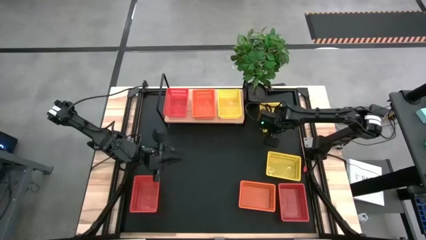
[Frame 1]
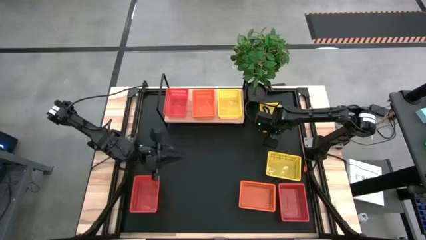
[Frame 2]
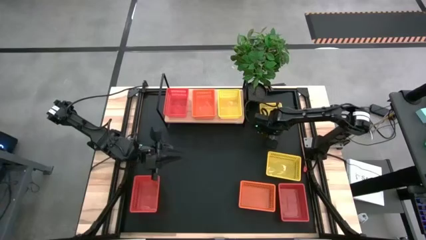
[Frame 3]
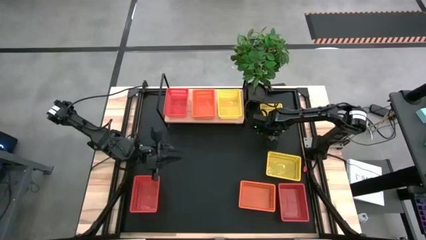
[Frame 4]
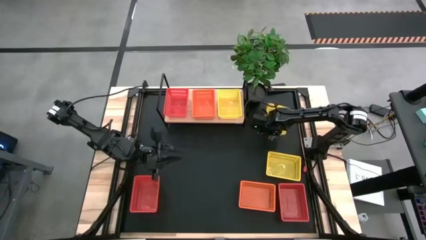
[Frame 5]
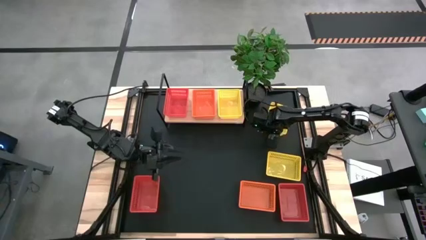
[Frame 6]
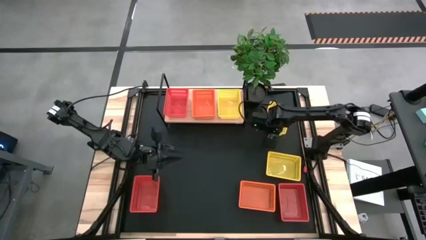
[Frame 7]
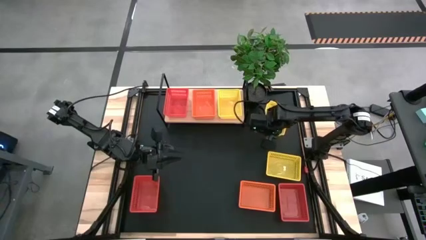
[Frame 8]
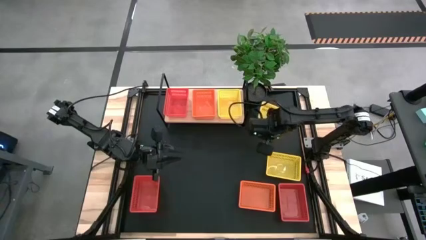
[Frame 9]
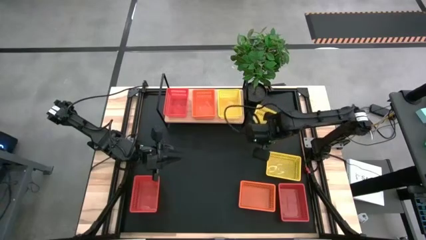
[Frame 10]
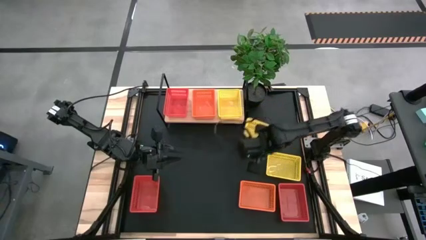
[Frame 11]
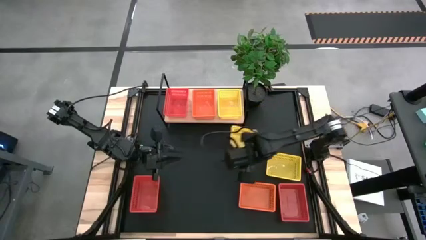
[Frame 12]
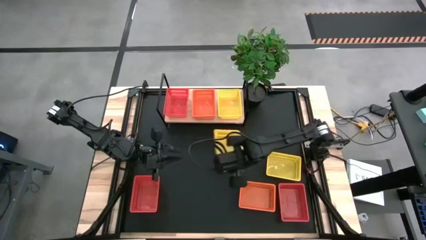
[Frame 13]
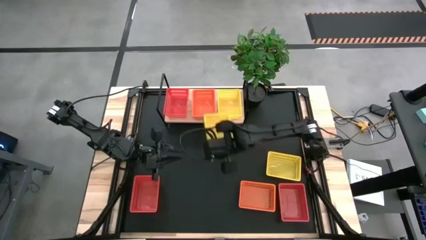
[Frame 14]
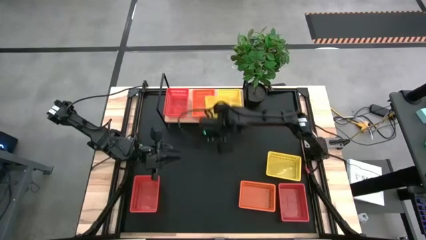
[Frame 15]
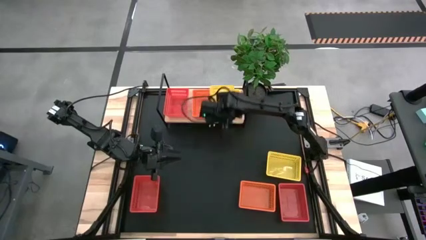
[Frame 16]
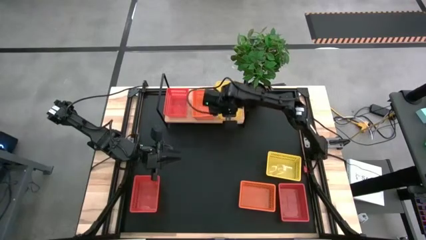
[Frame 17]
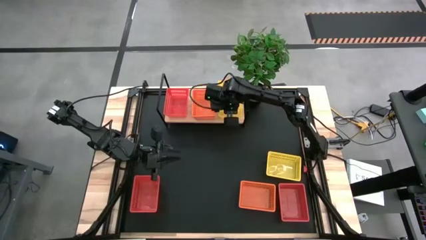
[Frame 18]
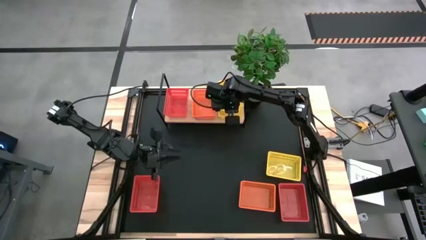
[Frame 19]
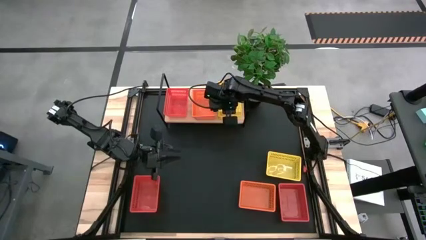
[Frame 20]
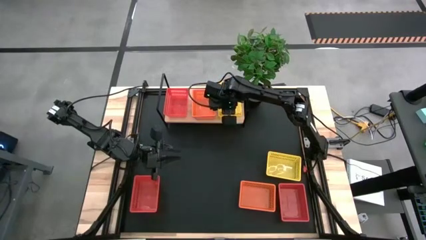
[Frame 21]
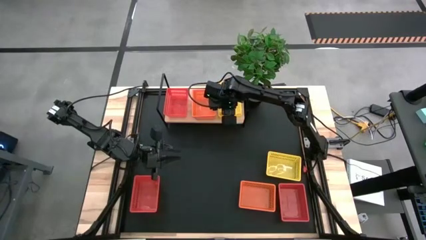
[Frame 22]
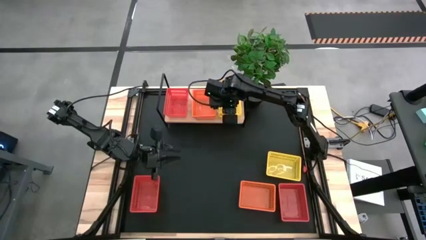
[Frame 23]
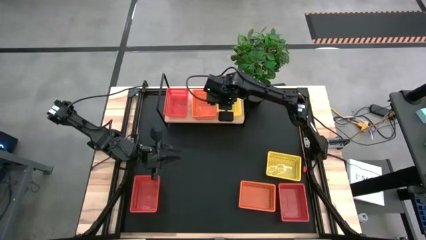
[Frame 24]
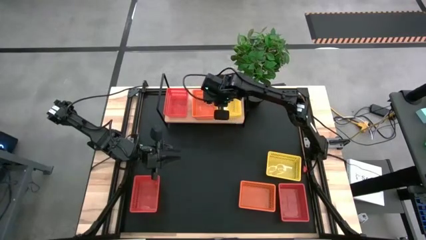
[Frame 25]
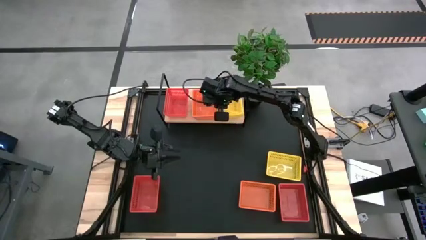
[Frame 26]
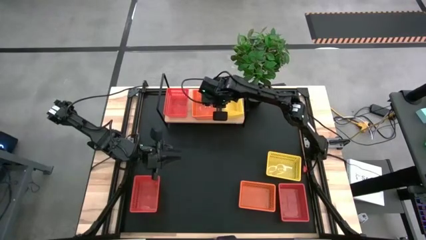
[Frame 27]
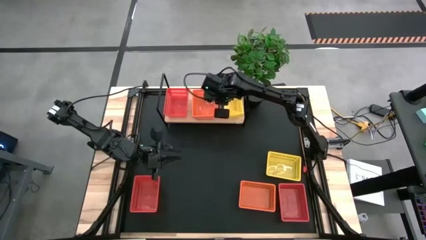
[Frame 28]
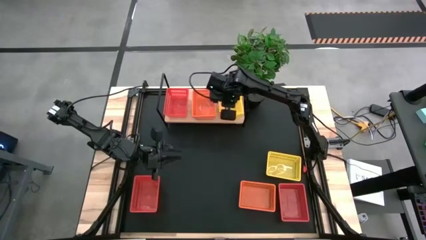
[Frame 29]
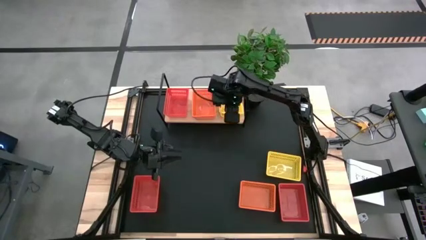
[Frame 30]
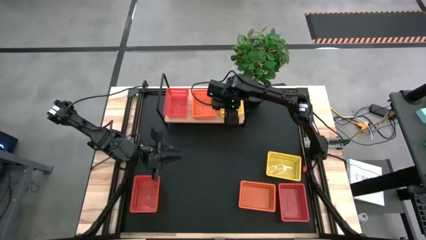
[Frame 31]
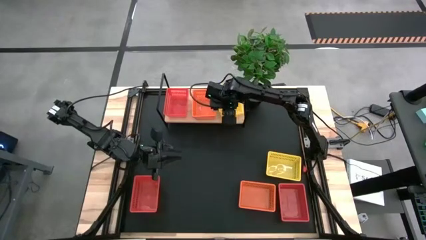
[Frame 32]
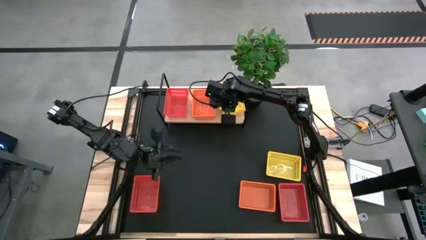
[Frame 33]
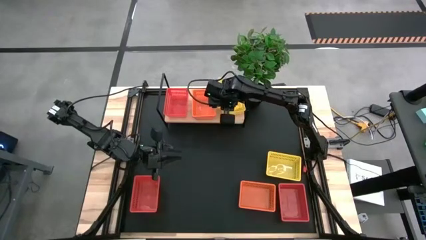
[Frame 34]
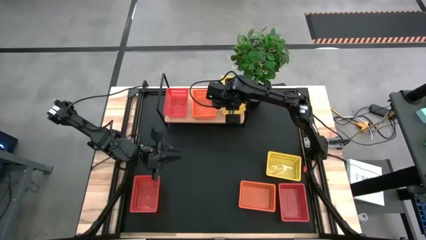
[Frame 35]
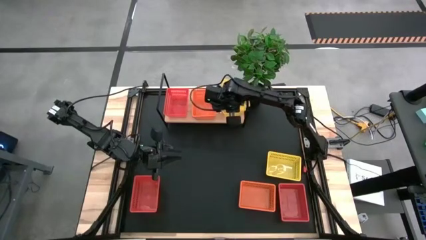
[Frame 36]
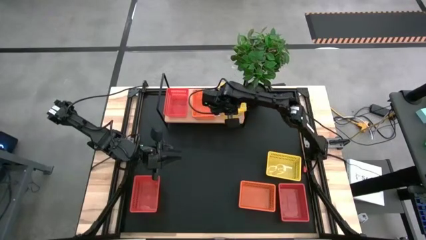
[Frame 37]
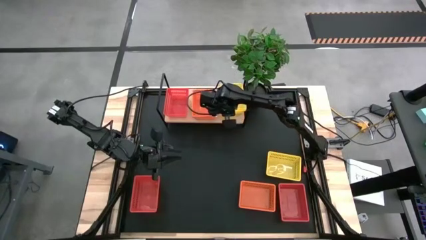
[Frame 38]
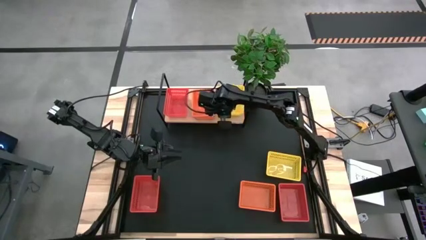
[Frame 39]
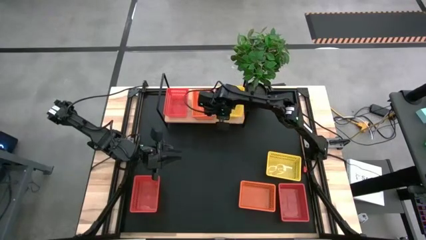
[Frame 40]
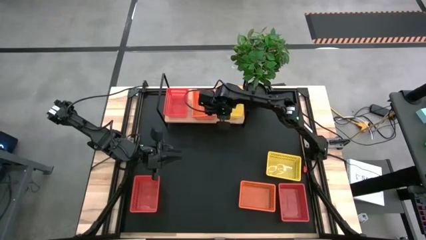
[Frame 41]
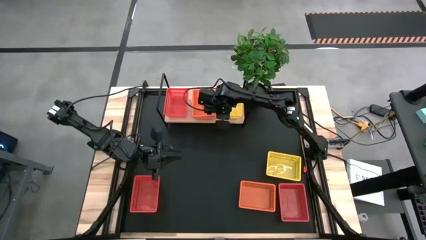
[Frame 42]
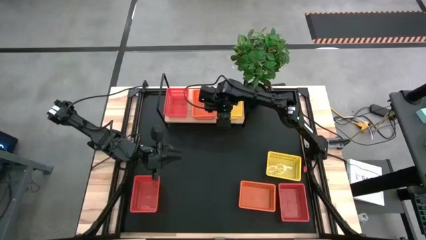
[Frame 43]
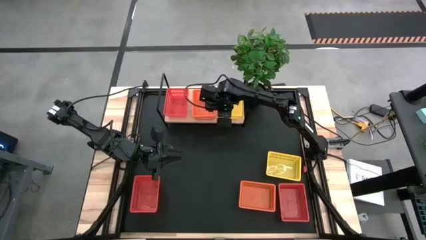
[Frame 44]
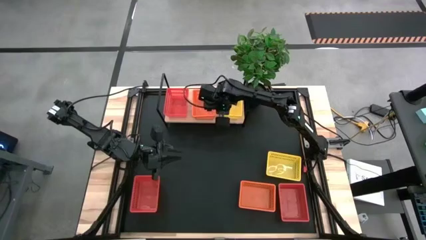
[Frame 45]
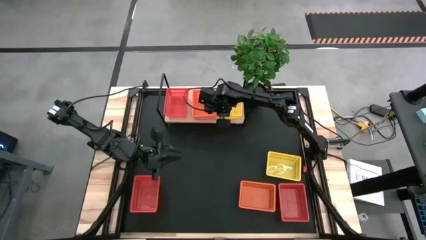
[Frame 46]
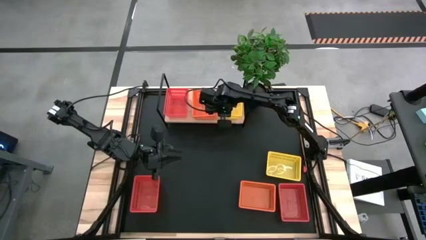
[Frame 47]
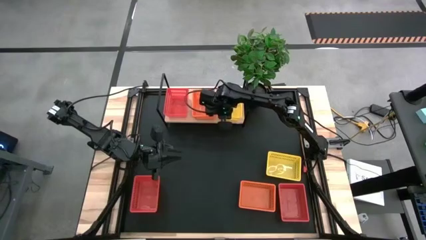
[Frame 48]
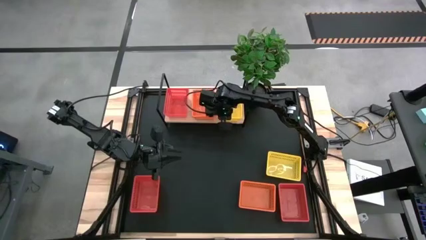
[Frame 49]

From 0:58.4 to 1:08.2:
Task: Stack baskets on shelf by color
Stack the top yellow bin on top of the yellow bin on the shelf

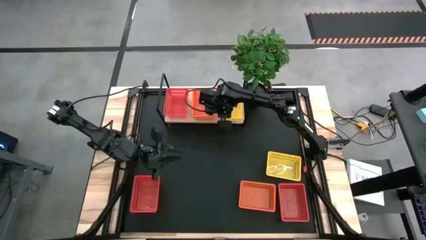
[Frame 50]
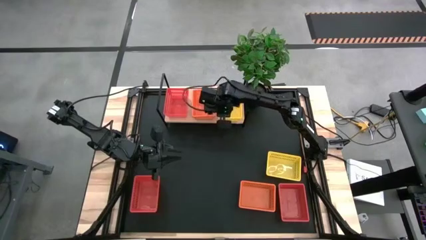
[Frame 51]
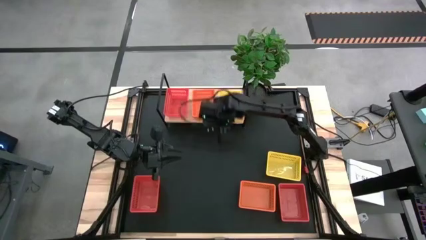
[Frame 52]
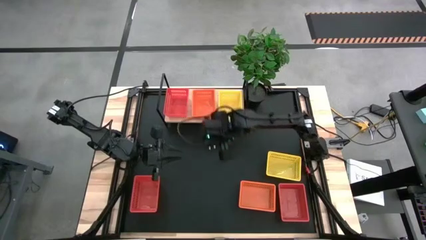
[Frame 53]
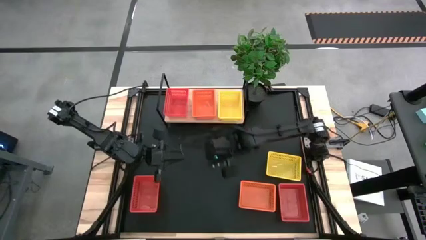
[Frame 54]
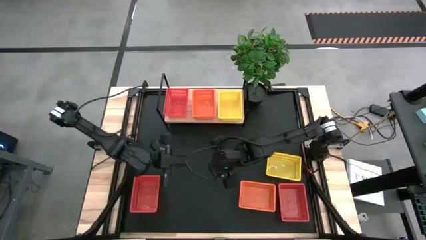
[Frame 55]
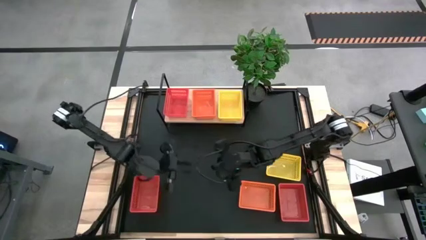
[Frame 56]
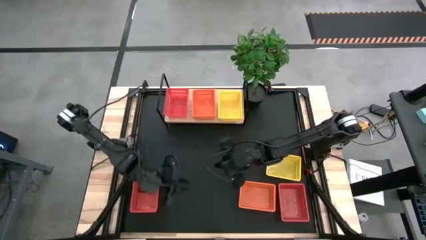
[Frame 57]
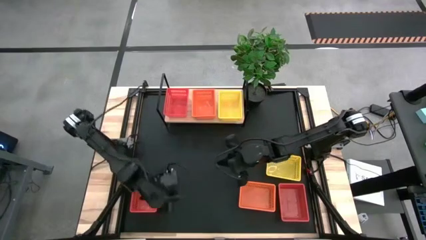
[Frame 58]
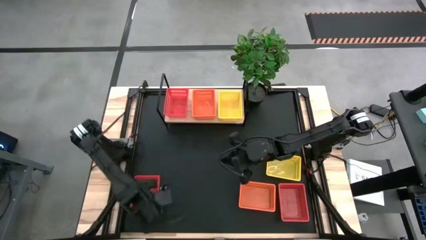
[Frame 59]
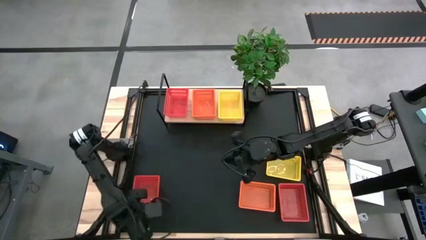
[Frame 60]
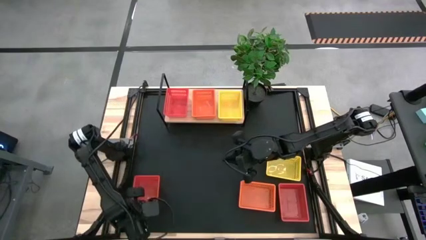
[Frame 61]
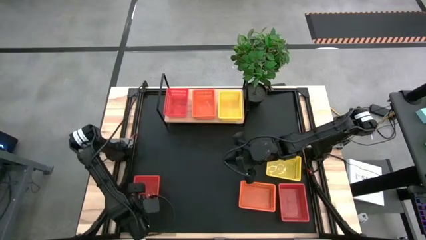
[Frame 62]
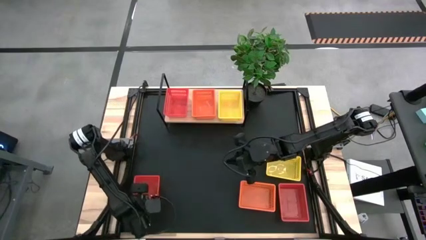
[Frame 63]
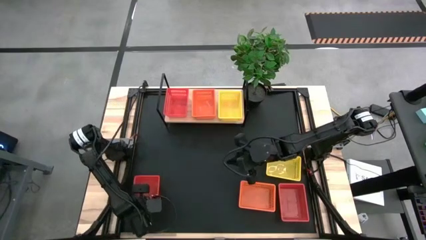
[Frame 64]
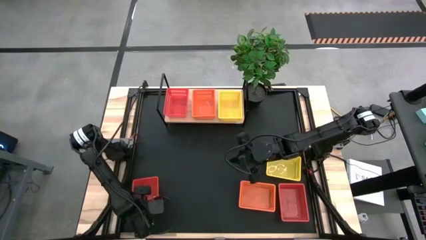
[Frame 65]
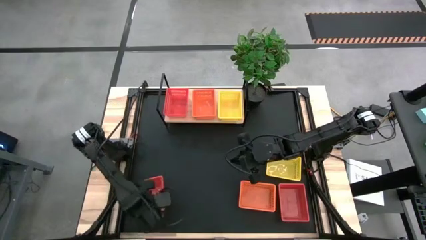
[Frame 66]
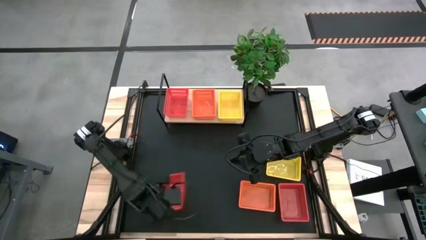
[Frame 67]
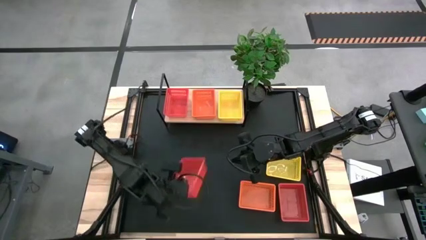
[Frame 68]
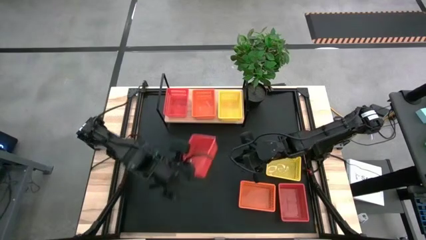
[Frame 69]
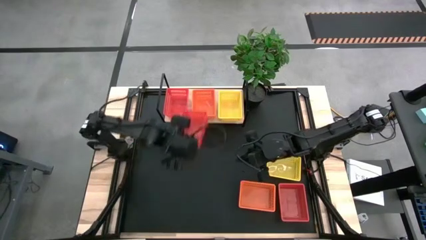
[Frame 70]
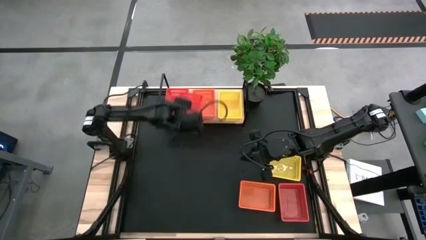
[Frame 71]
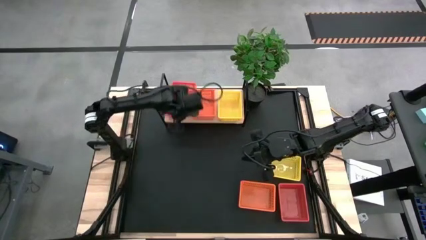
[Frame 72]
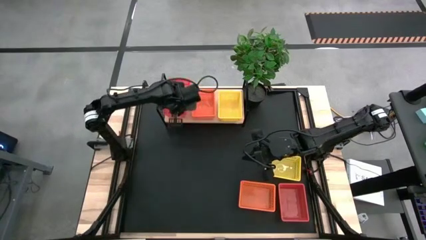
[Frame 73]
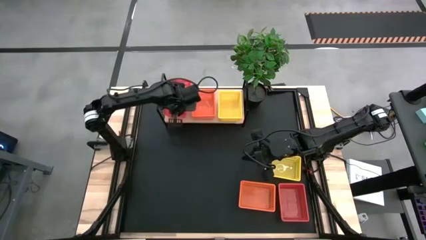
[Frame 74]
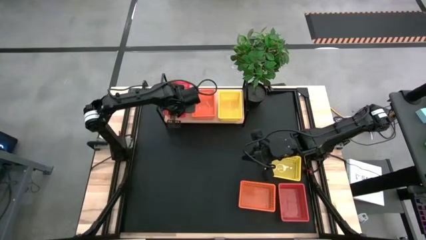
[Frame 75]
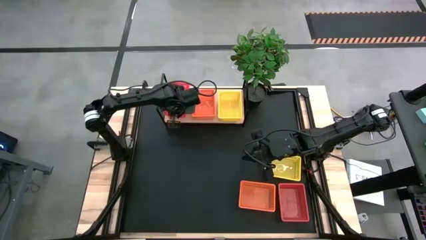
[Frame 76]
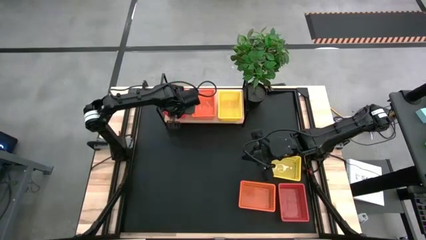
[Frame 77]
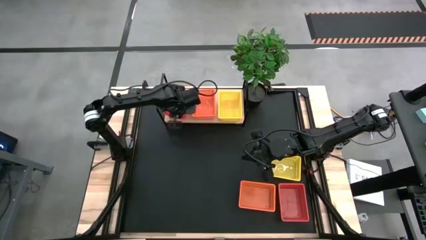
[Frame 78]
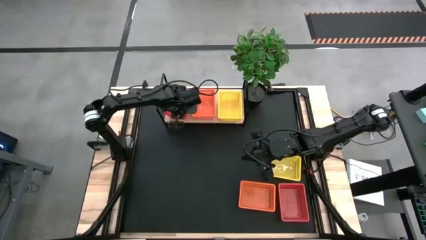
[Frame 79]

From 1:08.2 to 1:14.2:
Stack the left red bin on top of the red bin on the shelf

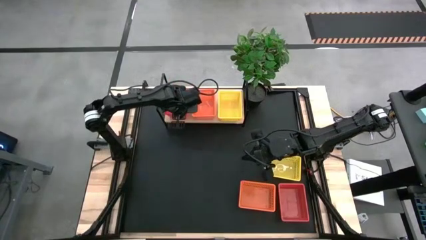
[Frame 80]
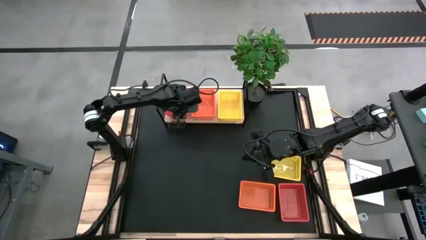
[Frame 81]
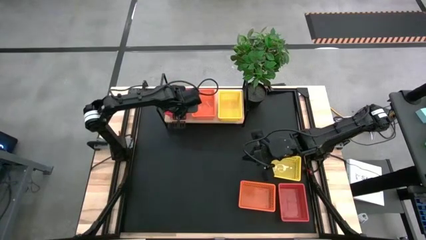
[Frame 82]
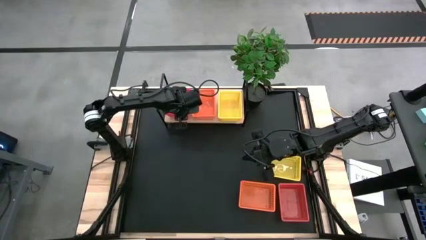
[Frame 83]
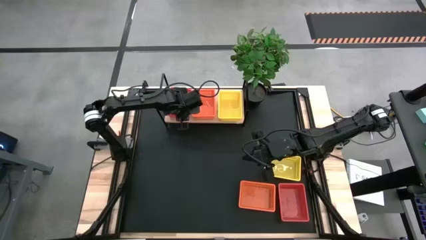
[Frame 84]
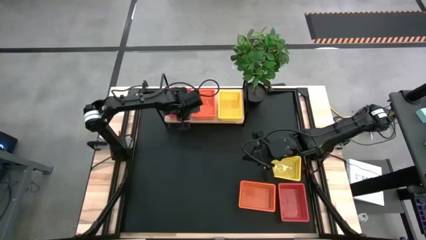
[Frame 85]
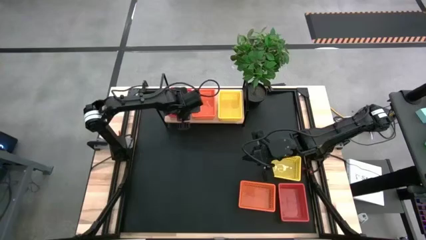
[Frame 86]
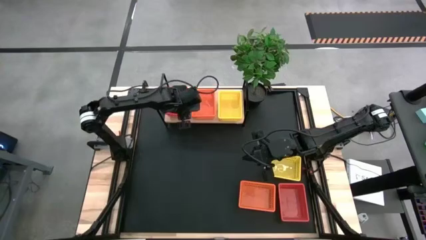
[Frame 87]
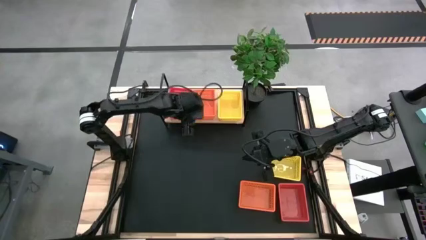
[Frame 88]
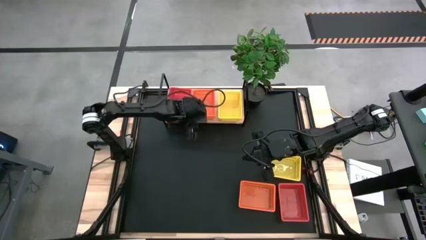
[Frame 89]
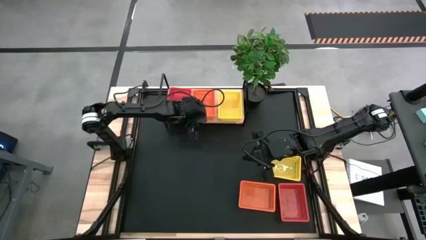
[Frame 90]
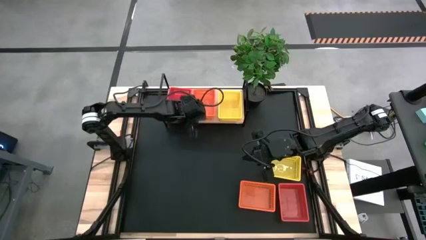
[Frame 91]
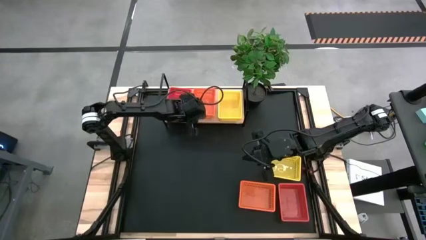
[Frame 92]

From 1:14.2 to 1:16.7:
Adjust the stacked orange bins on the shelf
